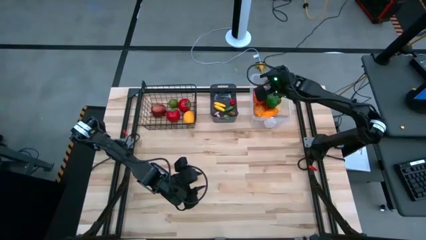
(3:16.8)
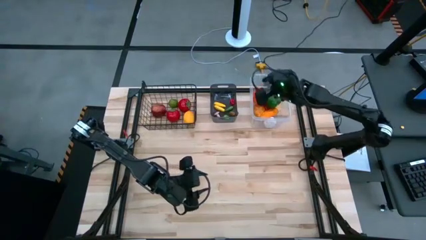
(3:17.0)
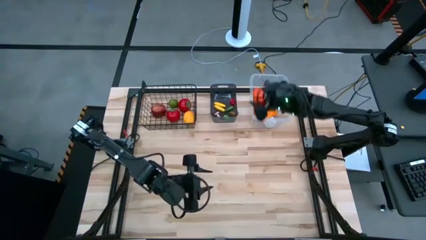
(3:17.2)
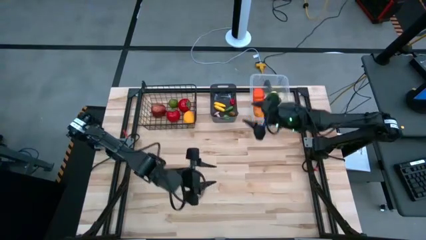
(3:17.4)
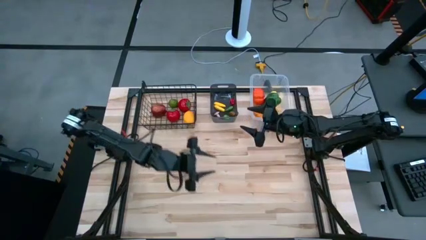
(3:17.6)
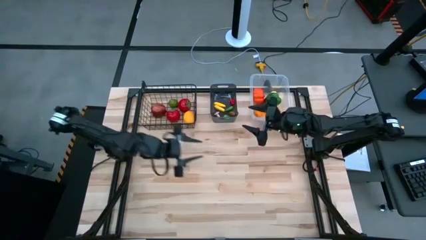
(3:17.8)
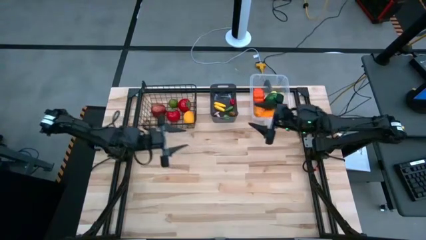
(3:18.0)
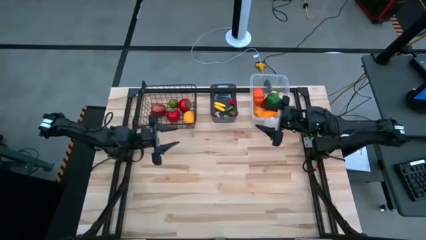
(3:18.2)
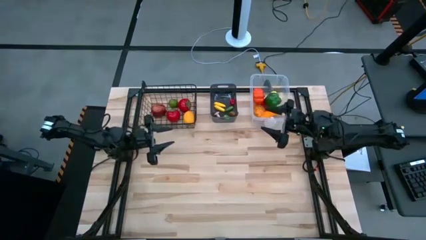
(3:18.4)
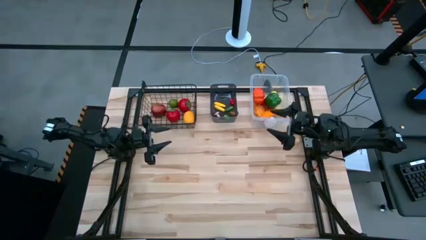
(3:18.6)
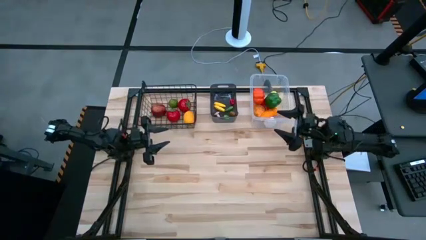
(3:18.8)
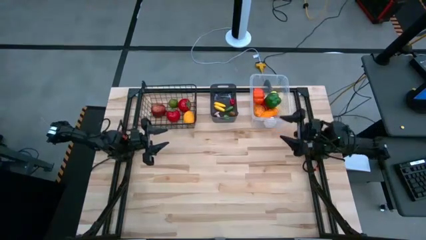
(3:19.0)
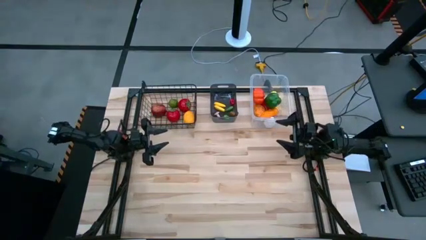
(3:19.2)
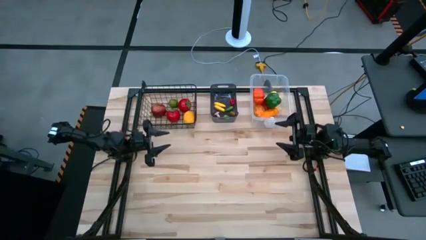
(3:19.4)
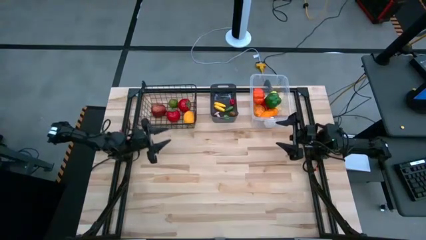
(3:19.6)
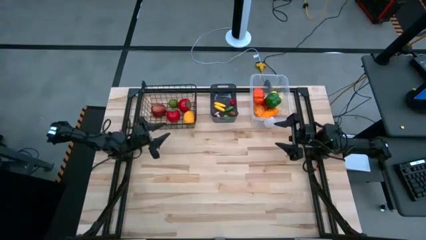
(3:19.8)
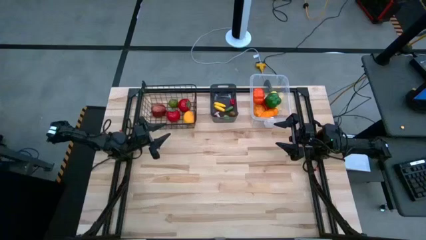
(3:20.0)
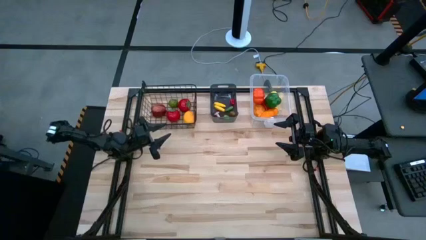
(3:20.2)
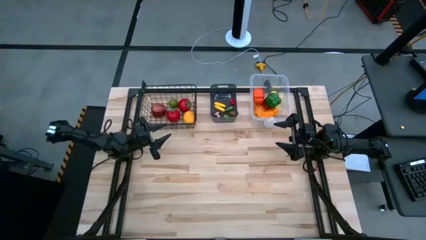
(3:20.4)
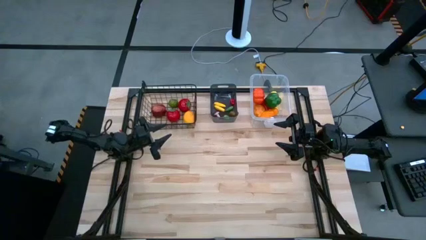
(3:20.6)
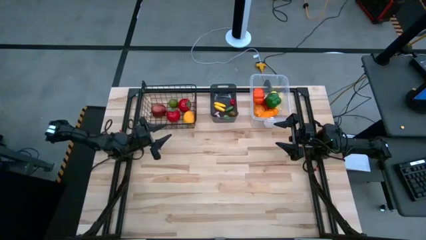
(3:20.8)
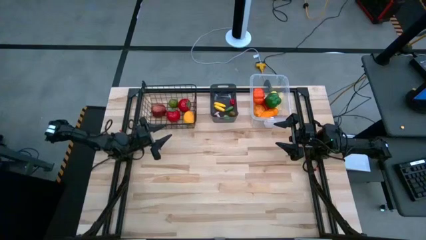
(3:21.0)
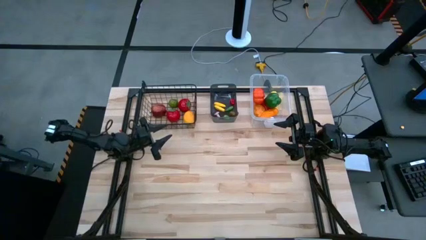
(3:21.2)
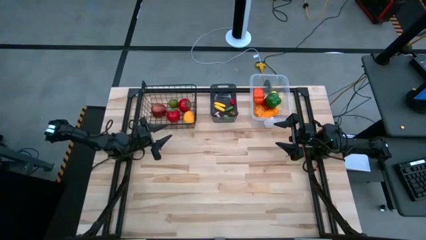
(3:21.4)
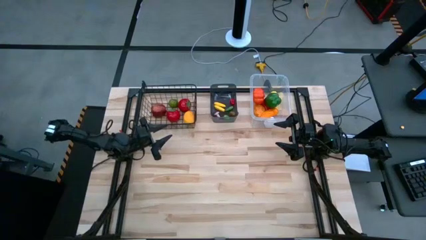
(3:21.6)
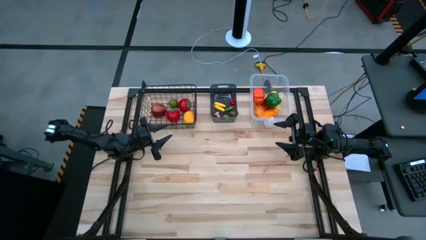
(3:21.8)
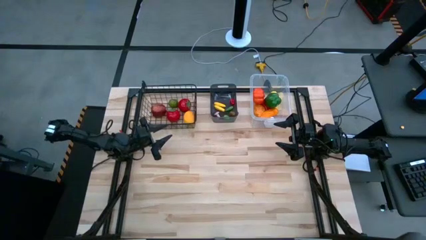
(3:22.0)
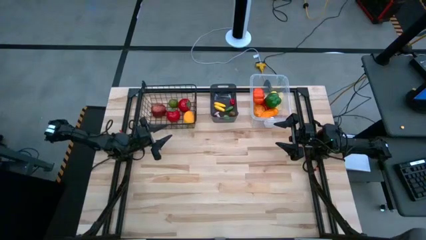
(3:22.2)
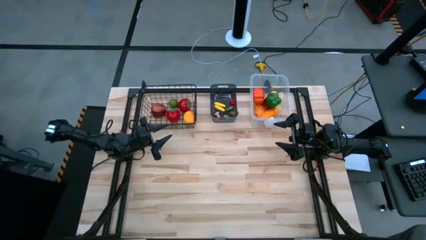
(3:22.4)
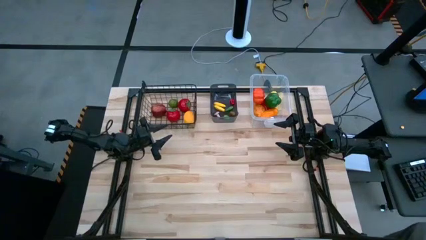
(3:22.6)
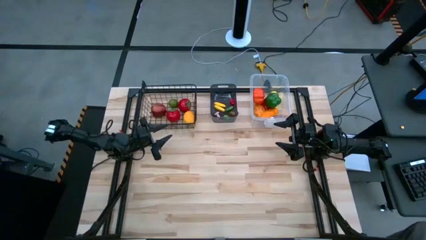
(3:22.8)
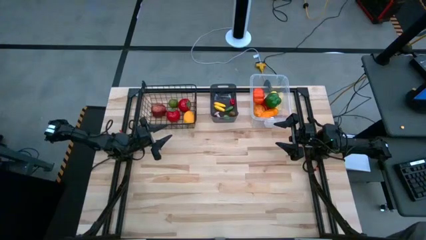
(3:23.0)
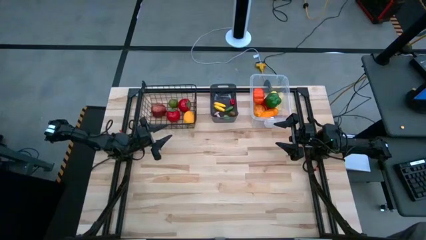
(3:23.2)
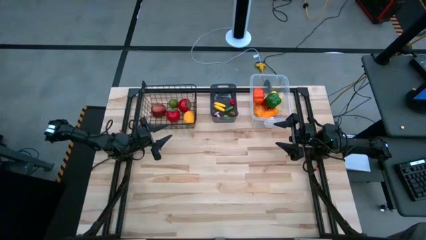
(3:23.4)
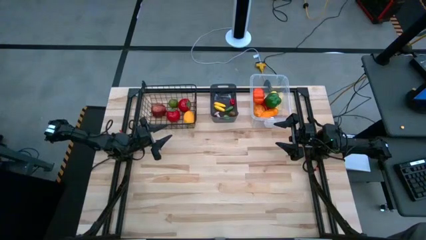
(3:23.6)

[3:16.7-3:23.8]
Task: Sort produce into baskets
Return to Home Position

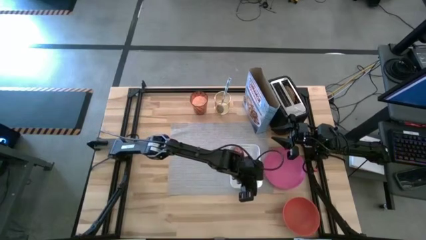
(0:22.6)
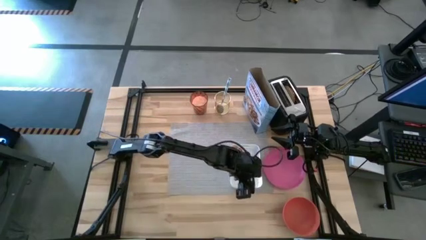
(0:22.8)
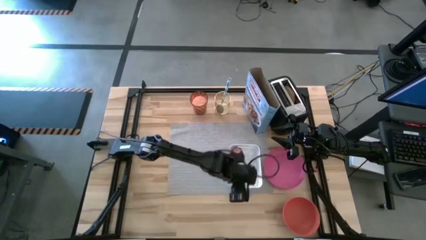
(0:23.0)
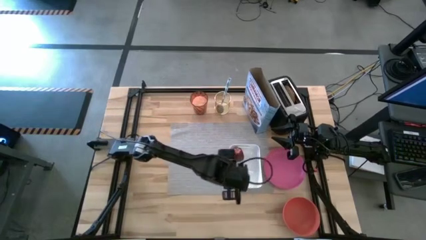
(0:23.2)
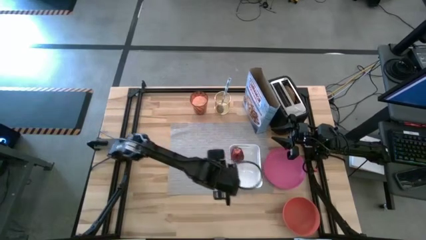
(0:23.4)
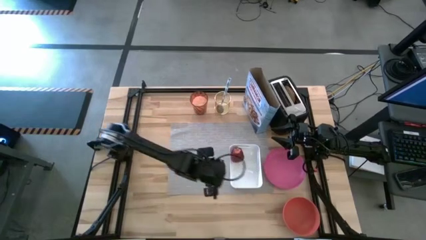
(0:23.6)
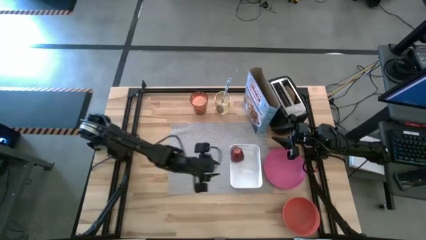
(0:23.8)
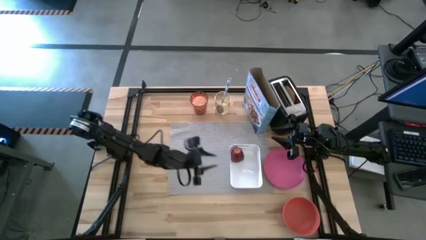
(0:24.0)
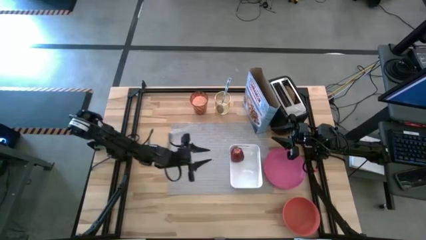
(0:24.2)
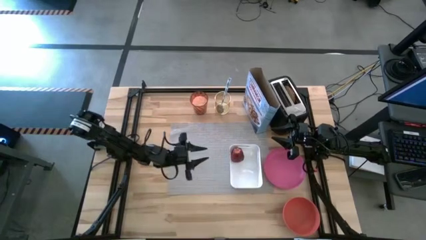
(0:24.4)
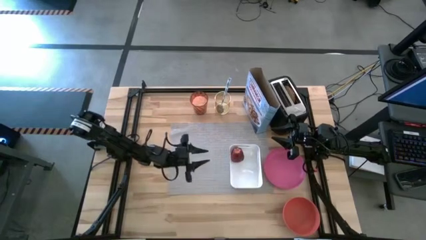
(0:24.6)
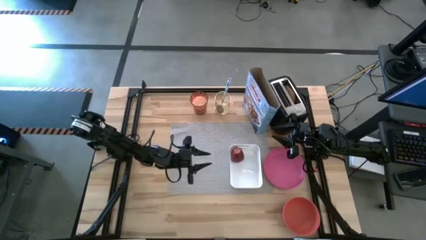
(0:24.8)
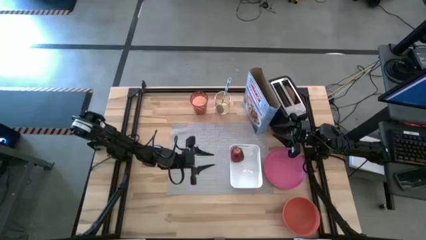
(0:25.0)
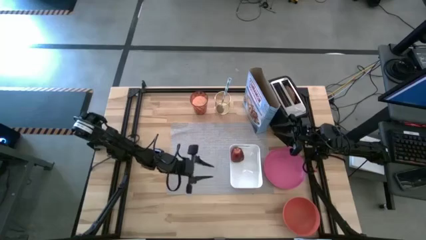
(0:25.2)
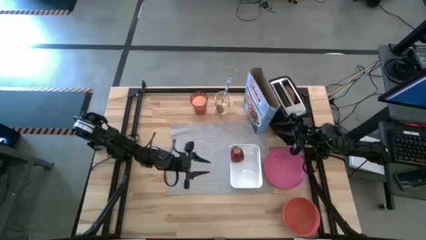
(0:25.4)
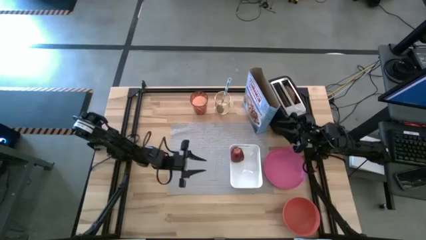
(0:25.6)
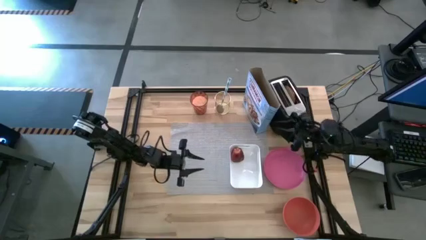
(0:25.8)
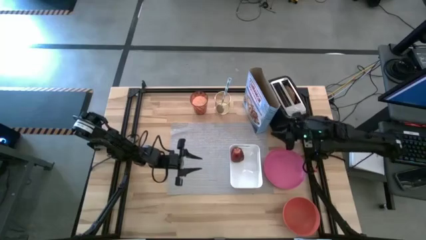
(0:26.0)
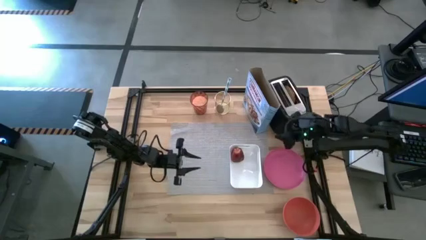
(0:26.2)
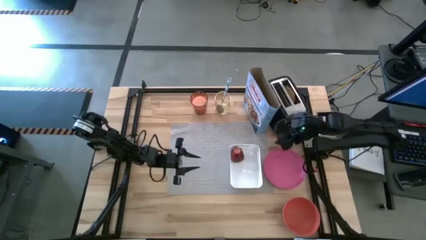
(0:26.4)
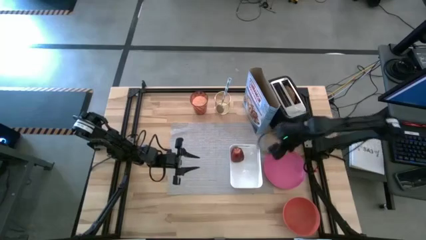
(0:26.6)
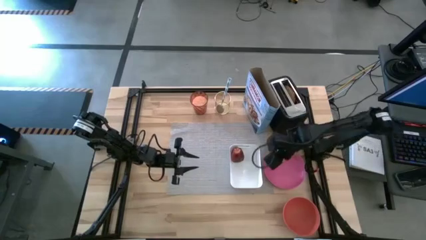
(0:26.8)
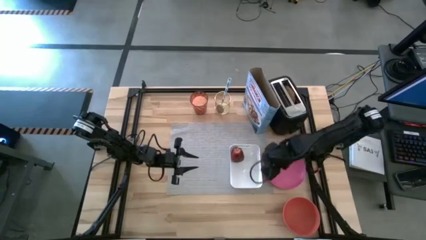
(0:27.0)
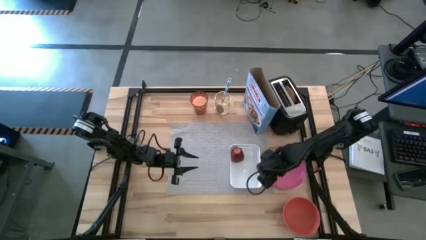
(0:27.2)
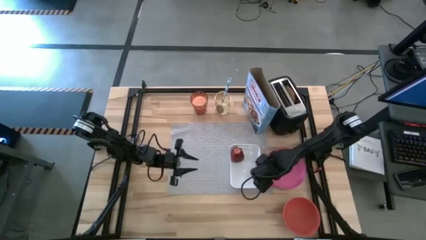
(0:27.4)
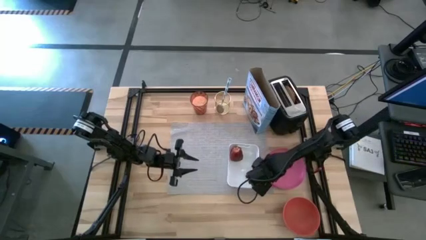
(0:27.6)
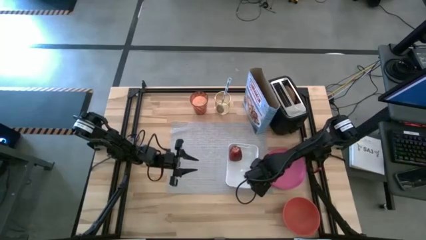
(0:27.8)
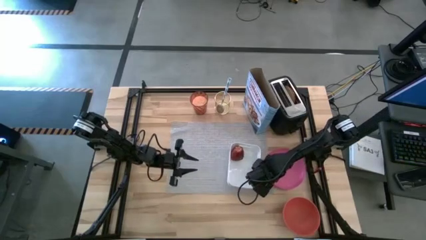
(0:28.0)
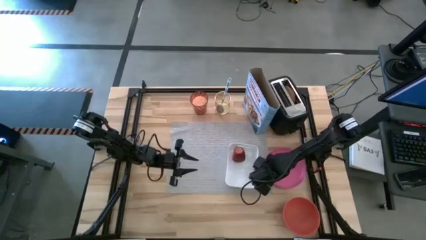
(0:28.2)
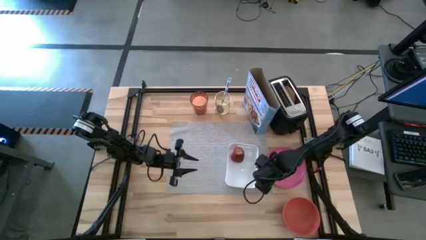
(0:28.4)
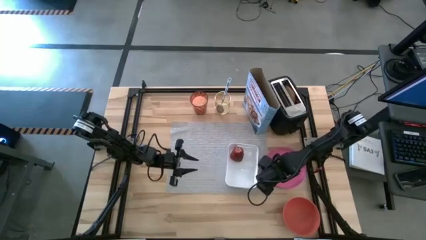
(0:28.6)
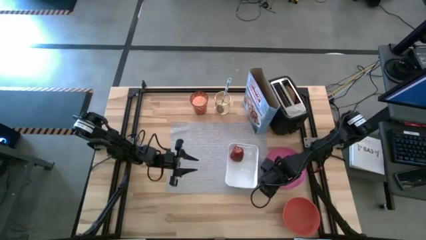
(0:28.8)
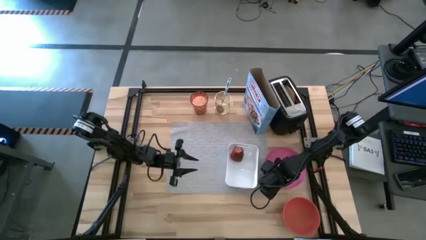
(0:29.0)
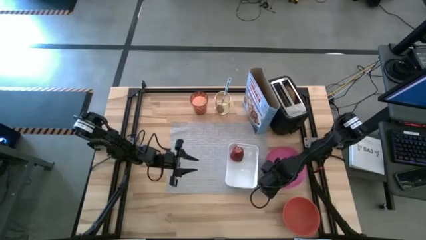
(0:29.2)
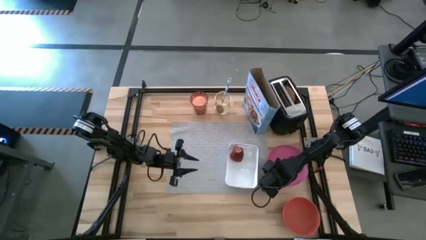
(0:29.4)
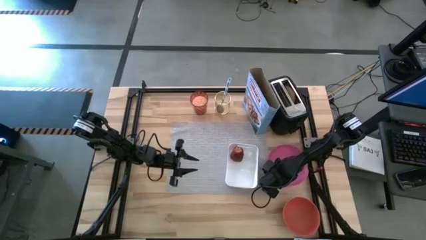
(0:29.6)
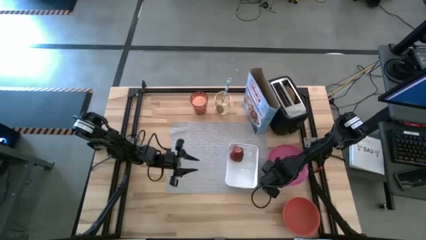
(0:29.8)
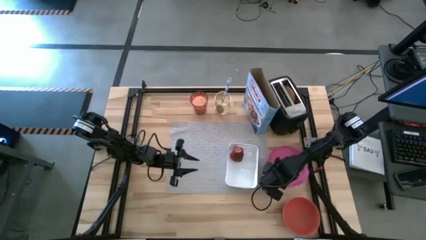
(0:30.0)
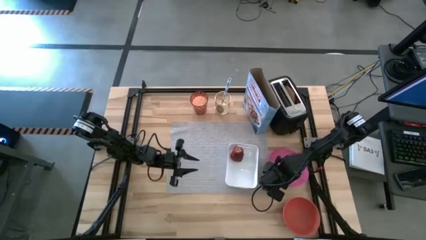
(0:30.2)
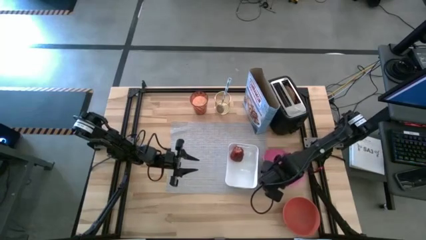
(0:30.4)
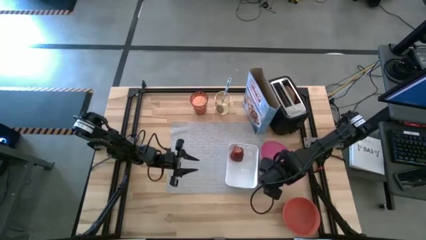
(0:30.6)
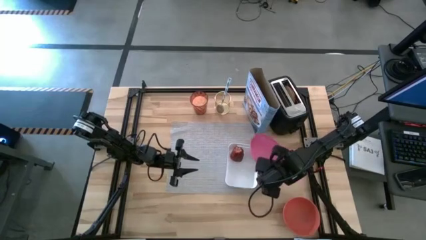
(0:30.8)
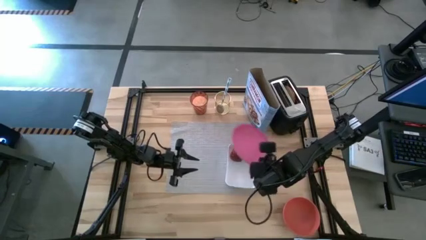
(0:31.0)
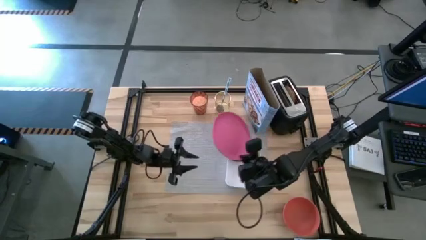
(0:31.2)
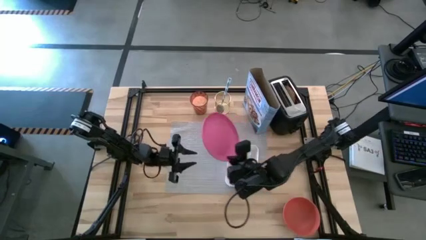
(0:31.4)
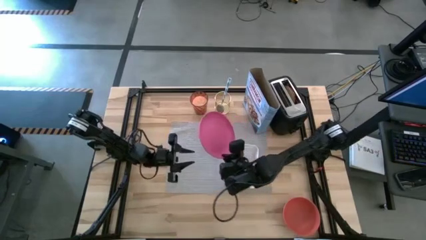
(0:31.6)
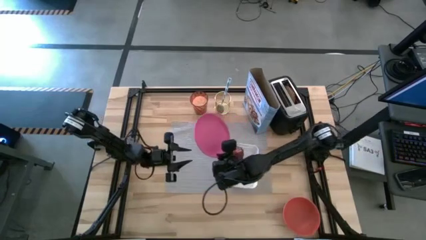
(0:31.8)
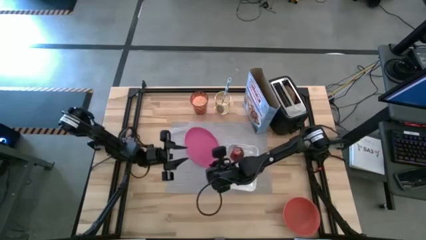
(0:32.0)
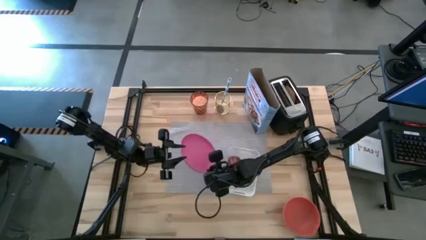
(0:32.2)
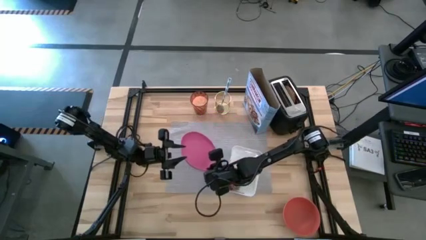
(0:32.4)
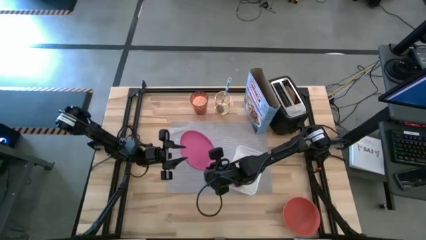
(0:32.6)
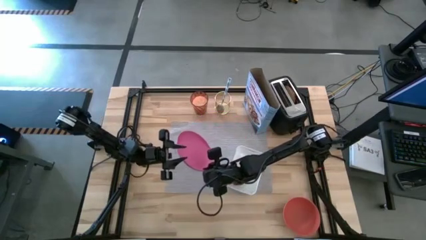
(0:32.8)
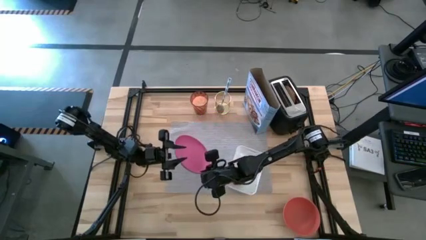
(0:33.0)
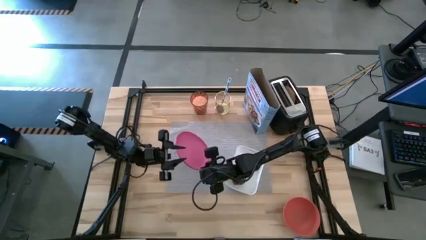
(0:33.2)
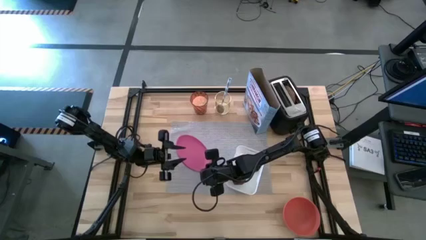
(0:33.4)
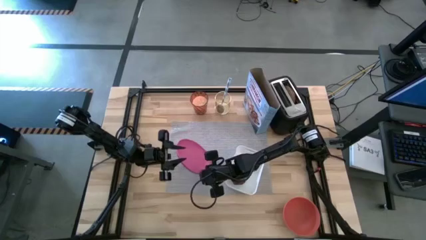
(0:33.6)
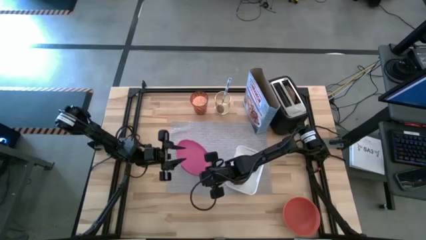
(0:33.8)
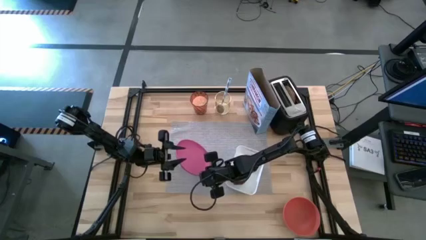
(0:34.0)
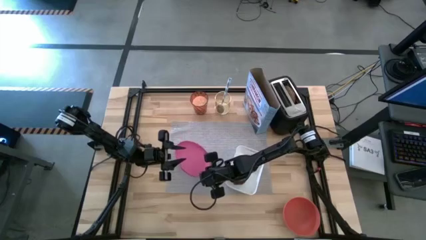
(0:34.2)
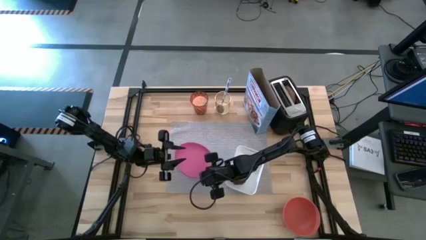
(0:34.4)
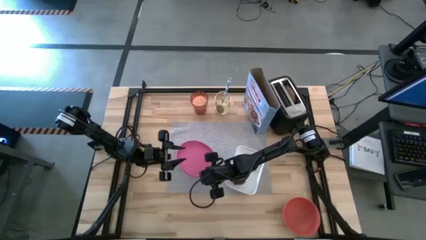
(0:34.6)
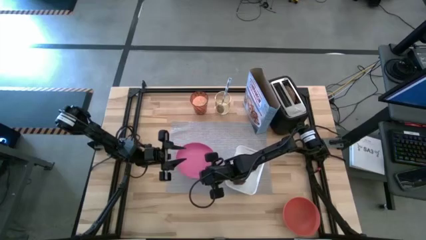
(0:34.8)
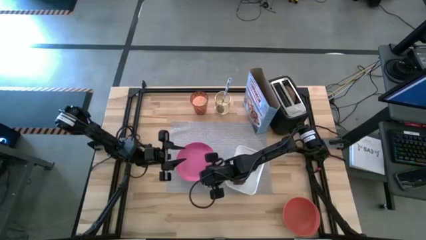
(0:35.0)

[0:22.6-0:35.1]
Task: Arrange a breakfast setting
Put the pink plate on the gray table mat
